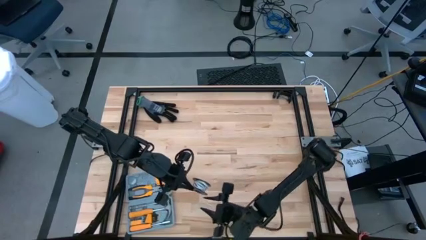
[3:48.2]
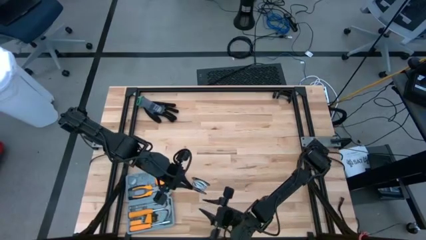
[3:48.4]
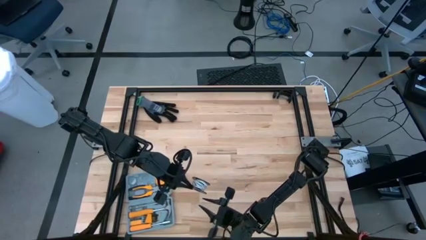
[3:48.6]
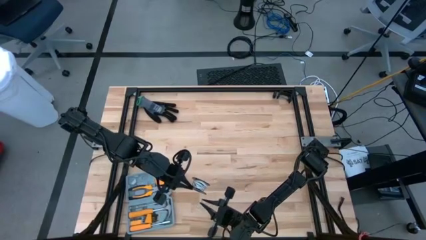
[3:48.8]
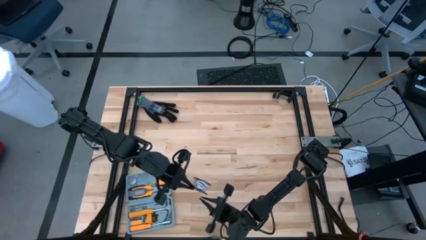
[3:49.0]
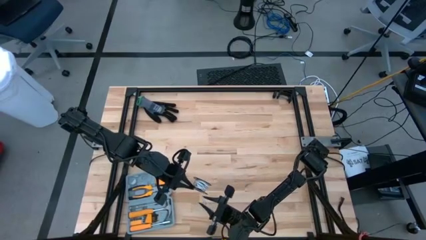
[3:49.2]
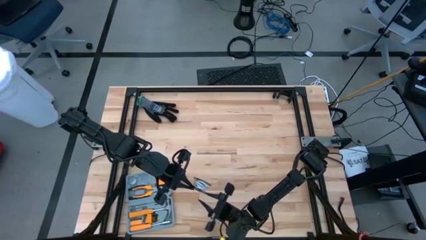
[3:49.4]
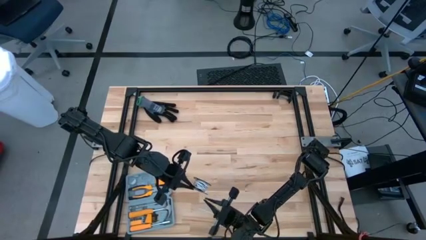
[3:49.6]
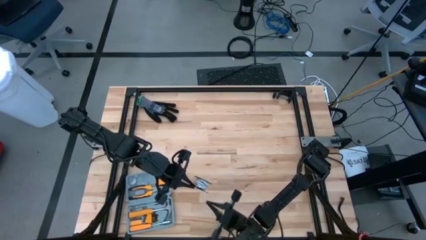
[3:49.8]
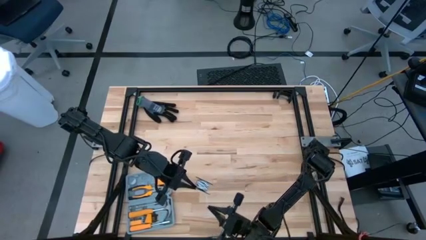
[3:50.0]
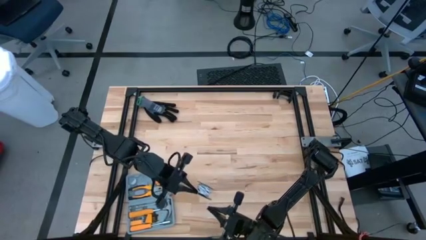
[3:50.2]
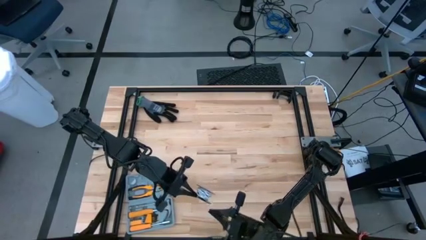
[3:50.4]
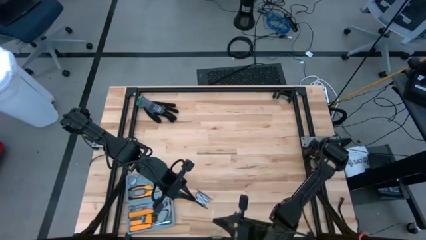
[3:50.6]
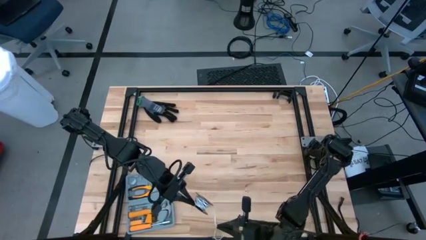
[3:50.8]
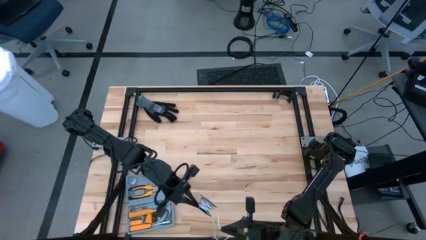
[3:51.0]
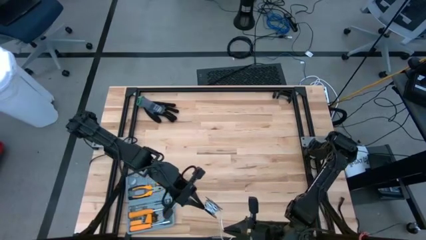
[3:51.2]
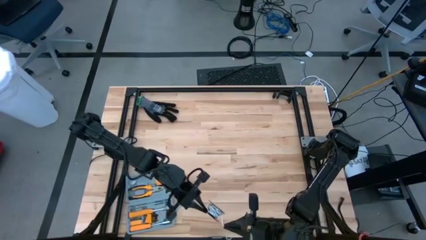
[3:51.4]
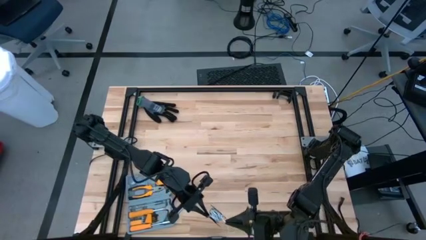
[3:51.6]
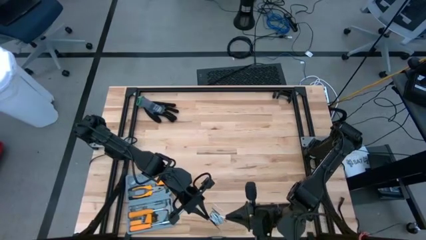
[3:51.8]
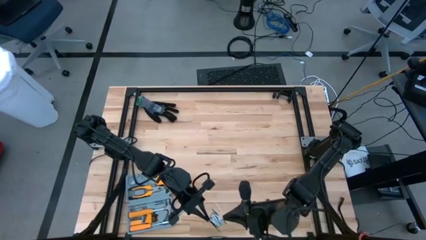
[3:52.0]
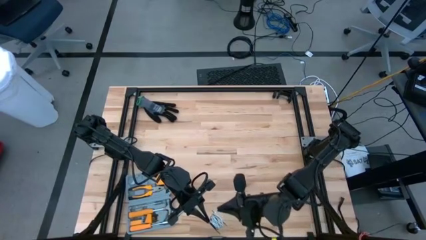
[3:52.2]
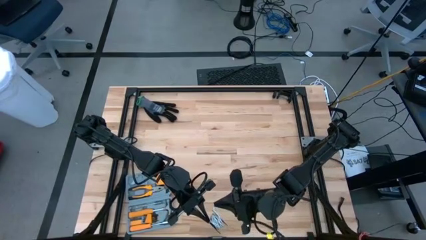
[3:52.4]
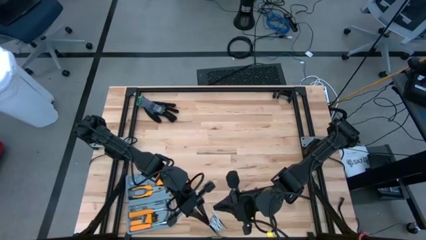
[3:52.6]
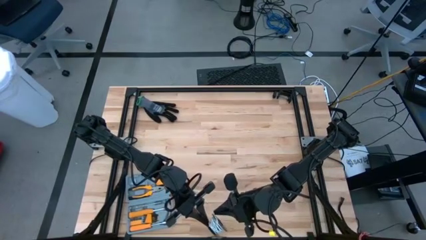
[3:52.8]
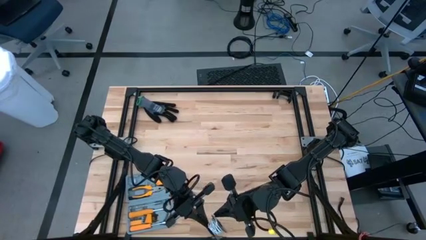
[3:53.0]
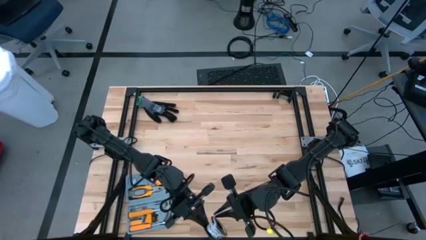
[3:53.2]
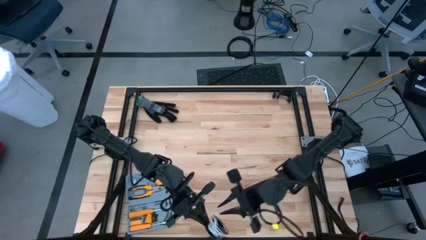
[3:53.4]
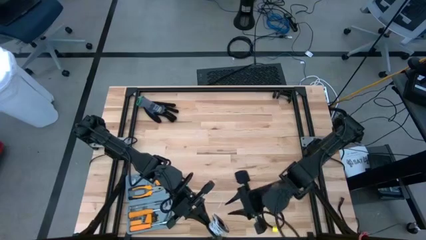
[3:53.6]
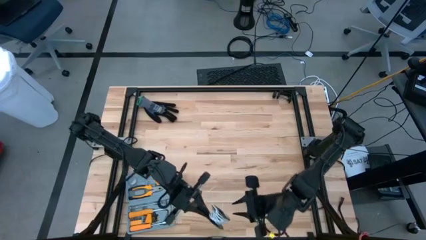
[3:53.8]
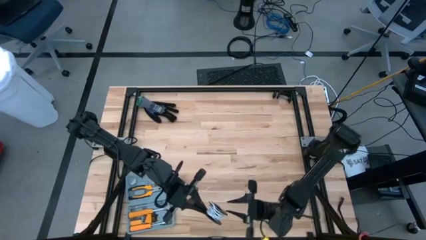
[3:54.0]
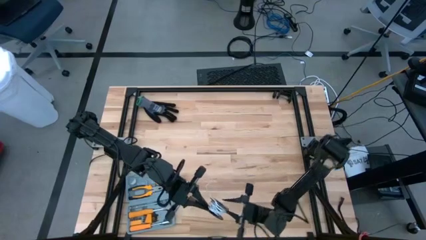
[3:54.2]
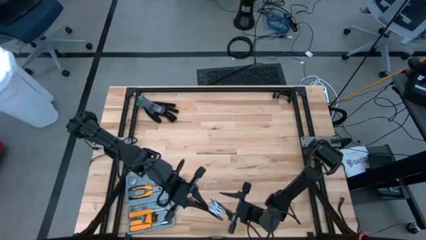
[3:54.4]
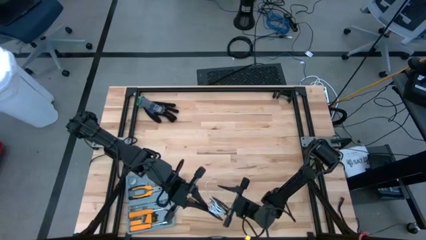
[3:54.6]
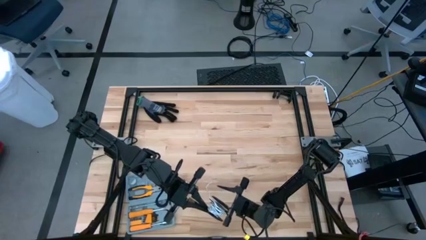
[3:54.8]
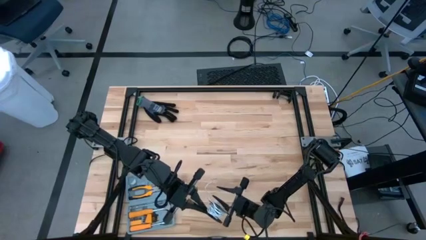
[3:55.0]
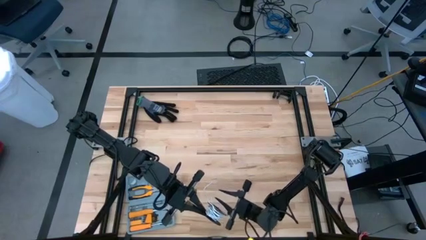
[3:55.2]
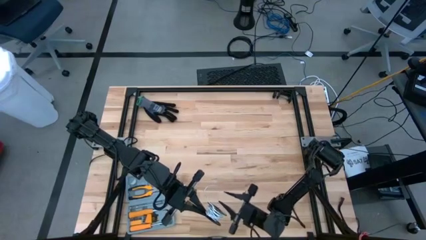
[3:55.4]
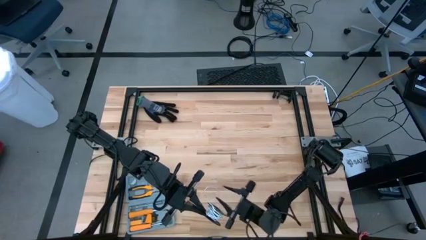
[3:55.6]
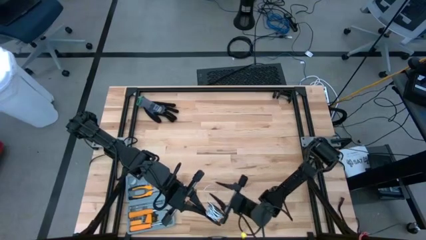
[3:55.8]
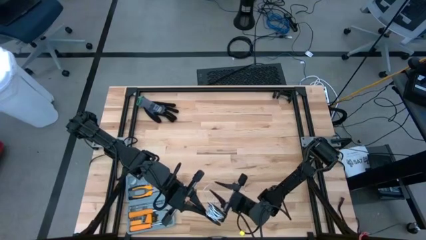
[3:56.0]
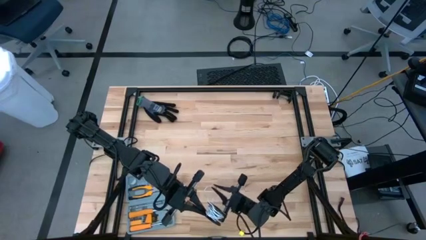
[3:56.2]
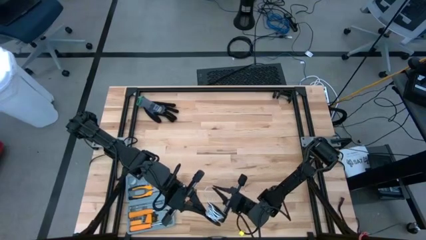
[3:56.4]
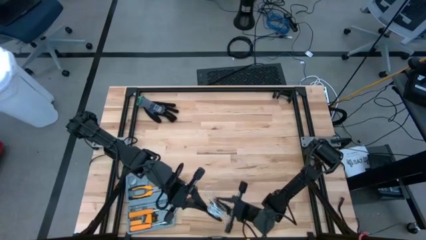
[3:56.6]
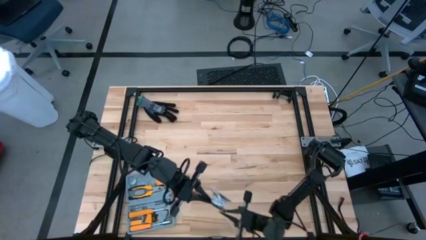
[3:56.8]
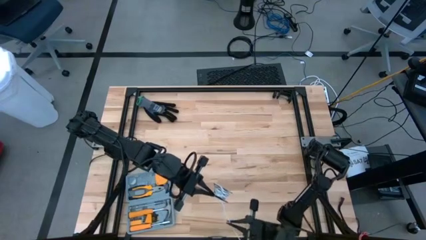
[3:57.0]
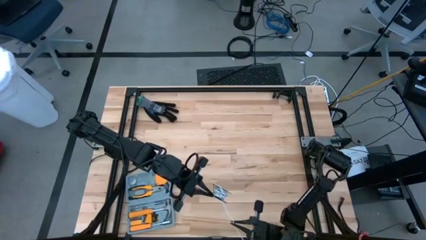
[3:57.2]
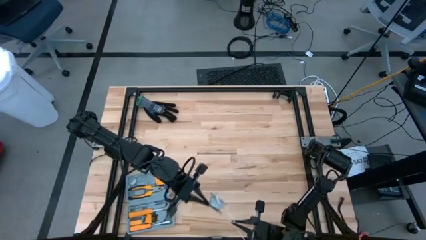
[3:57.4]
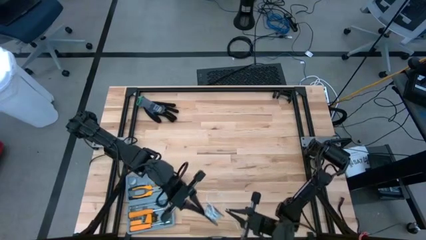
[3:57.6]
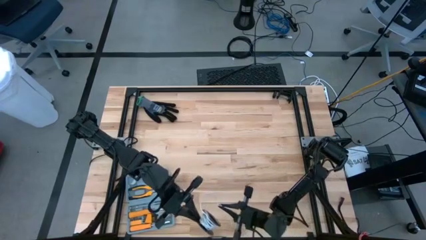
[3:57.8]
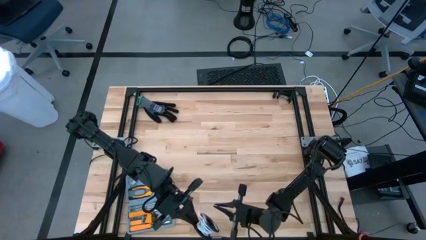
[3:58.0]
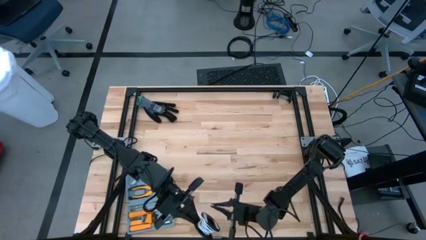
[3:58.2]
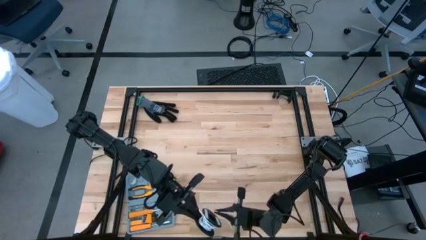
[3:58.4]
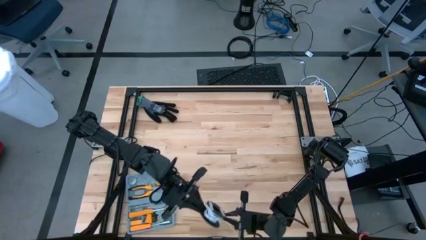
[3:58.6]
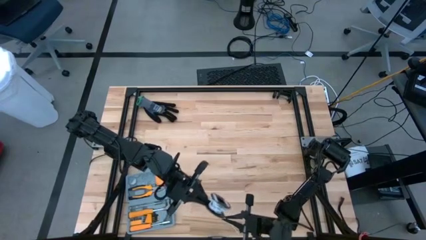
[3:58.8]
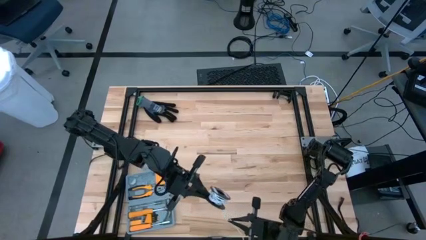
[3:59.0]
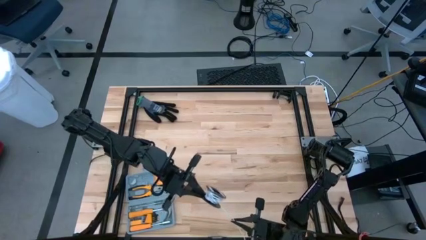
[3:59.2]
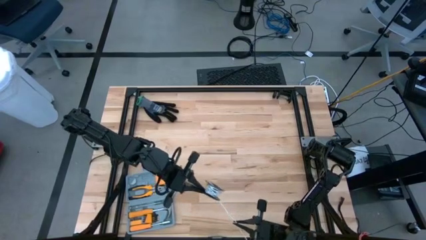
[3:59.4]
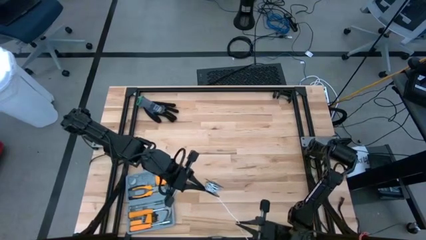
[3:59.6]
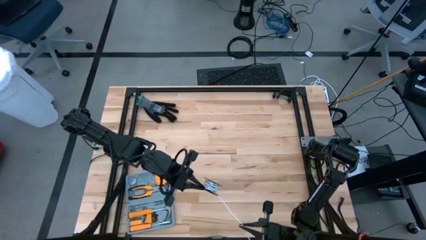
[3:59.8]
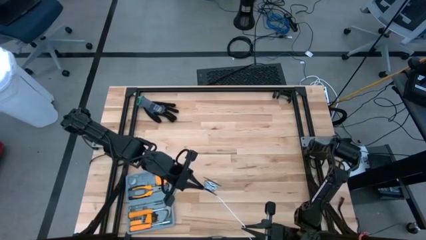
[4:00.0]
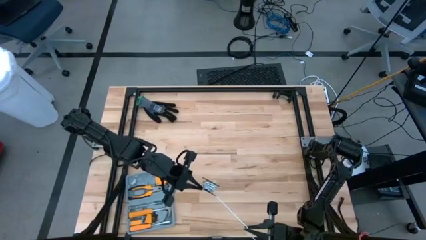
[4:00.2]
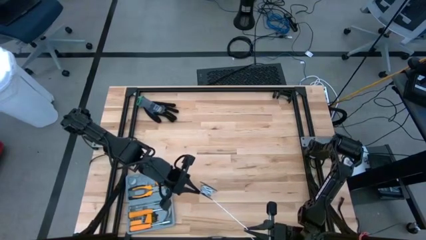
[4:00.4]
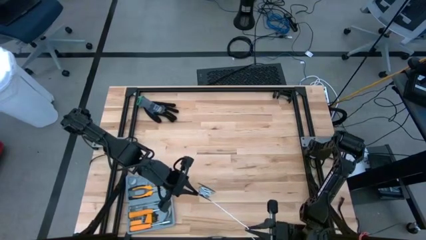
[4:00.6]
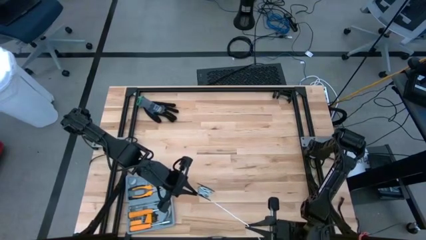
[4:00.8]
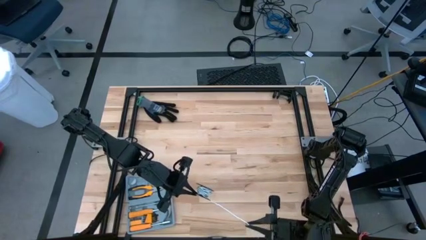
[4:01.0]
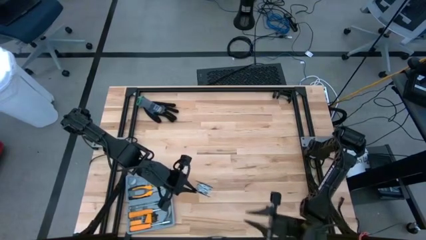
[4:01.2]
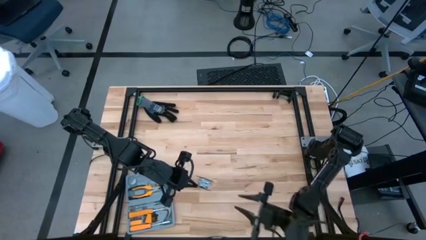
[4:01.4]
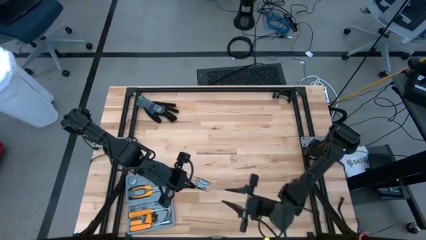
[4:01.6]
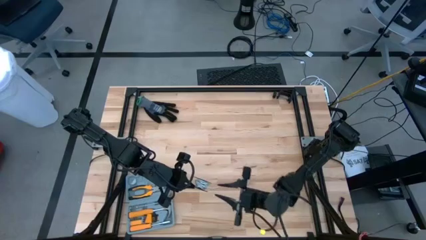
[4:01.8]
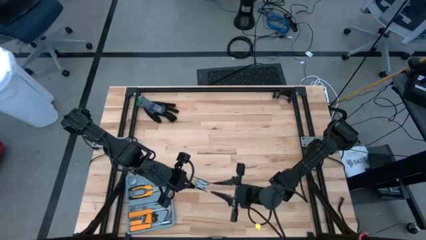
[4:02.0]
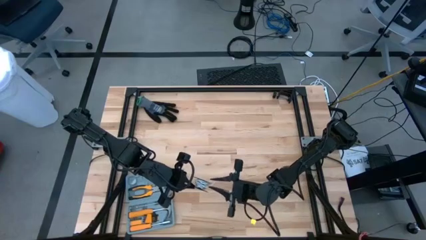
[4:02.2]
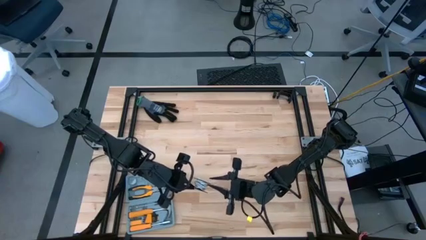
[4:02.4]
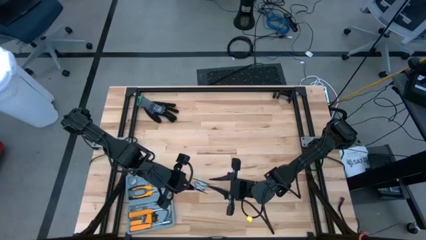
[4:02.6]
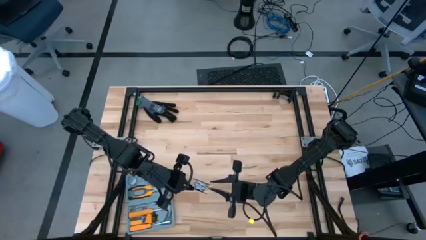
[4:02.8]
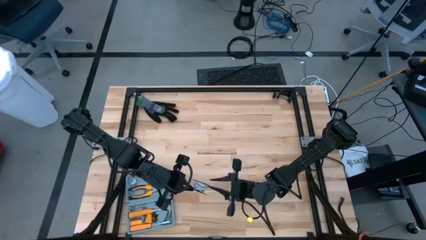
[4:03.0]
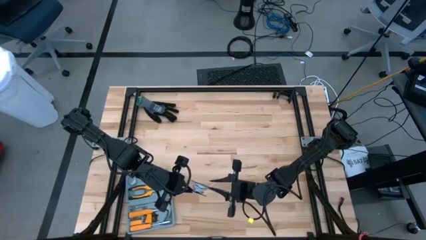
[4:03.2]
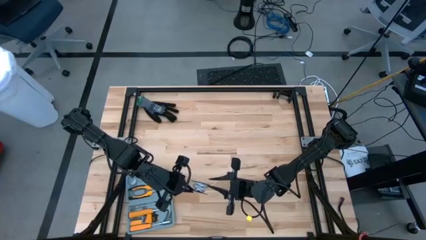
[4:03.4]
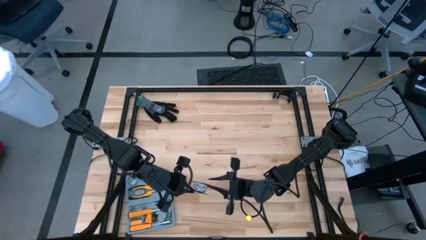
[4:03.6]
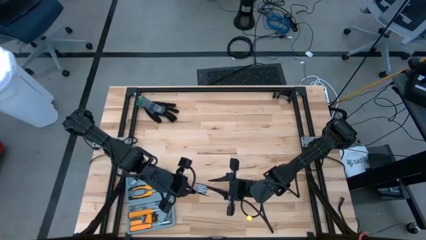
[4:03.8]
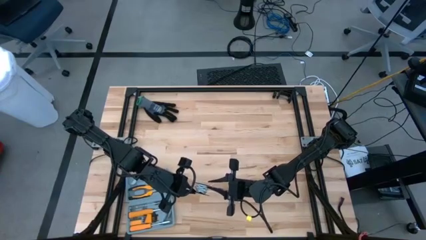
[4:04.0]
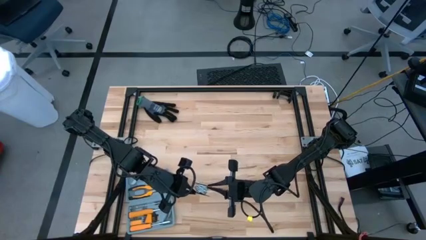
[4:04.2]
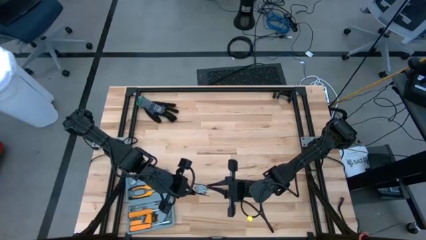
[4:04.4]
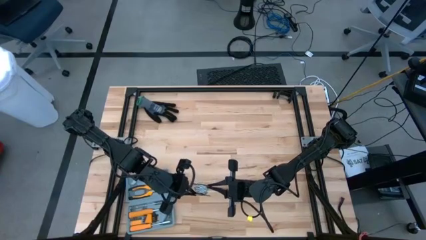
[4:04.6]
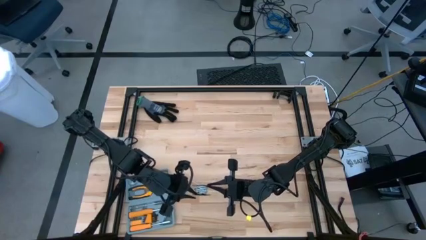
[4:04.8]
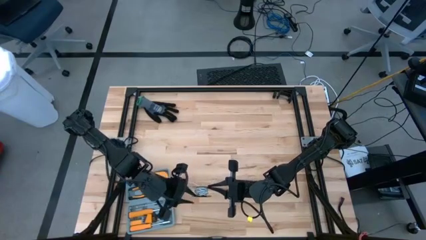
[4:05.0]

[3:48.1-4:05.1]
Task: Coil cords
Coil the white cable wire into the spool
